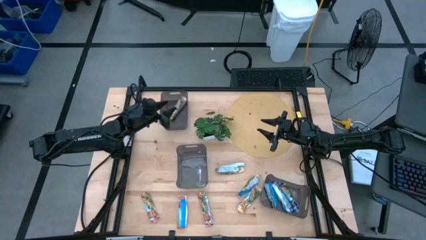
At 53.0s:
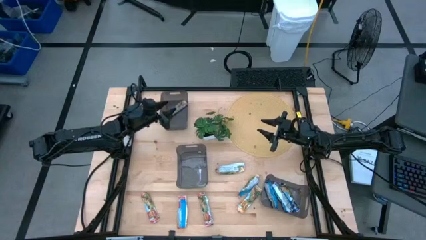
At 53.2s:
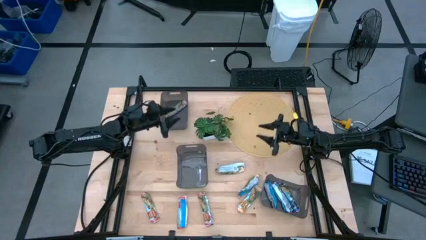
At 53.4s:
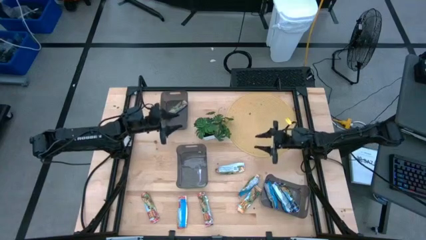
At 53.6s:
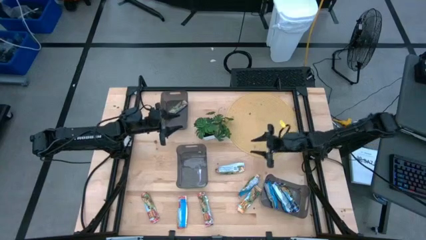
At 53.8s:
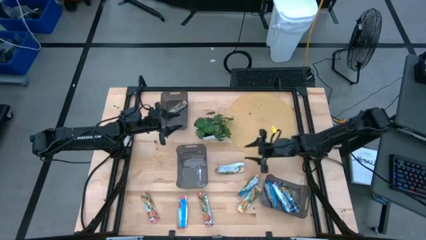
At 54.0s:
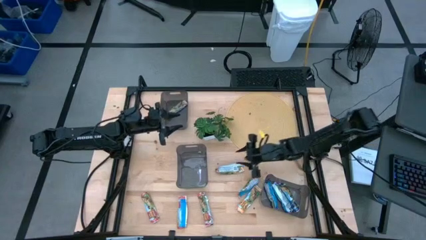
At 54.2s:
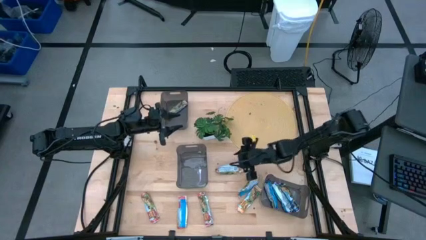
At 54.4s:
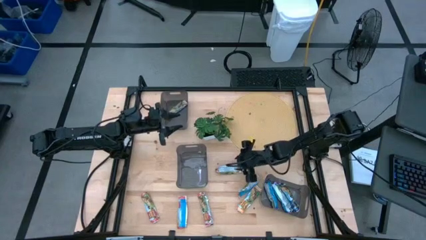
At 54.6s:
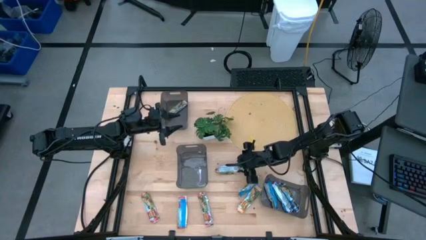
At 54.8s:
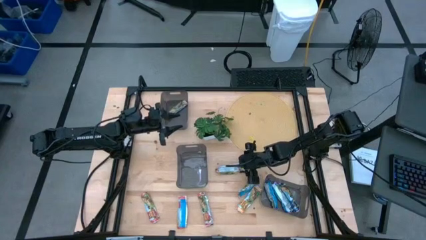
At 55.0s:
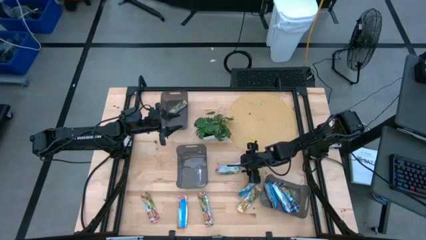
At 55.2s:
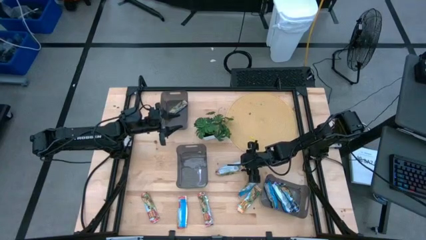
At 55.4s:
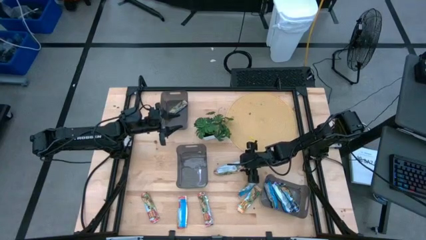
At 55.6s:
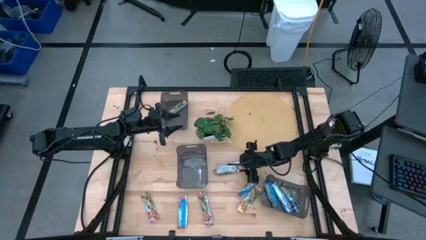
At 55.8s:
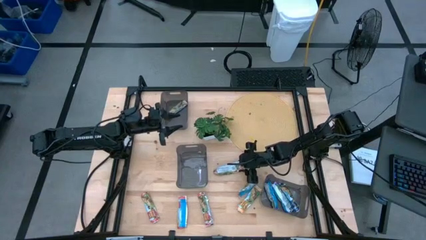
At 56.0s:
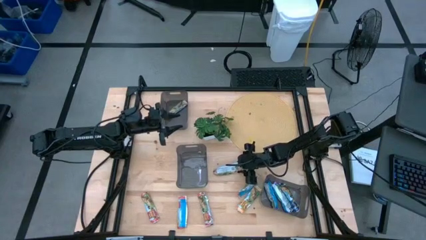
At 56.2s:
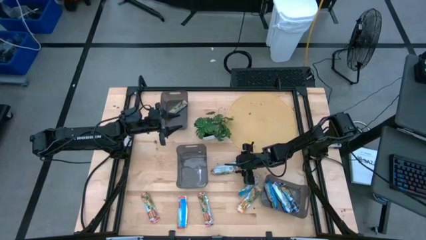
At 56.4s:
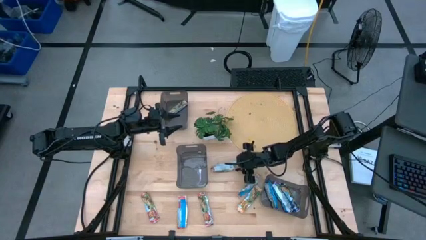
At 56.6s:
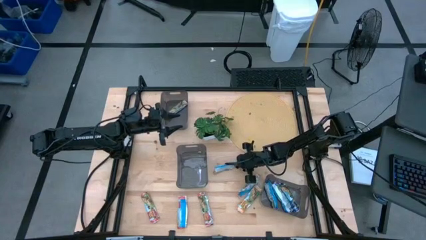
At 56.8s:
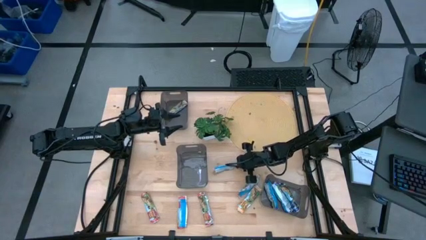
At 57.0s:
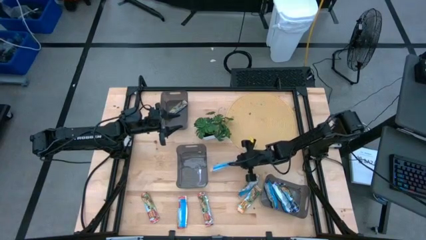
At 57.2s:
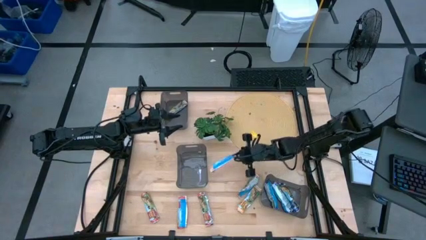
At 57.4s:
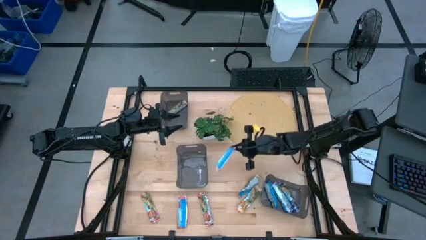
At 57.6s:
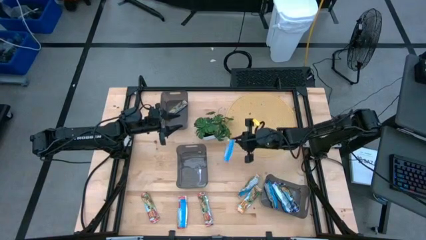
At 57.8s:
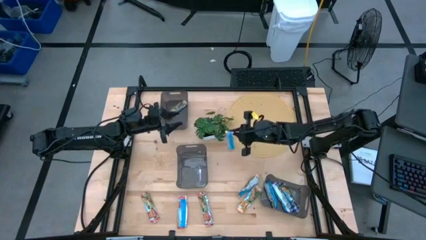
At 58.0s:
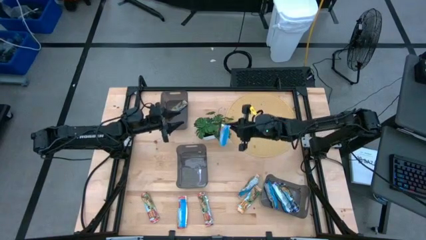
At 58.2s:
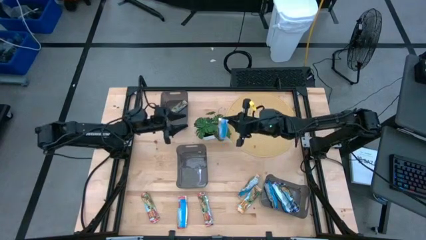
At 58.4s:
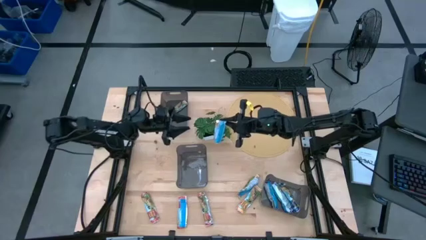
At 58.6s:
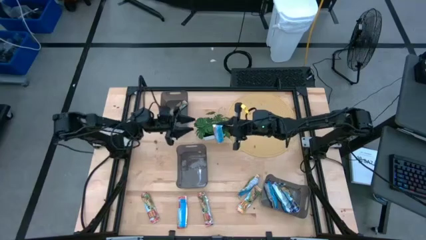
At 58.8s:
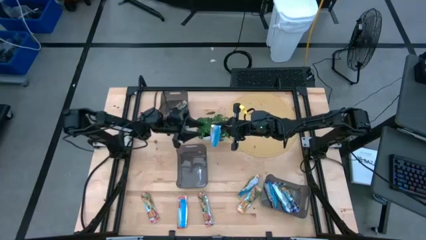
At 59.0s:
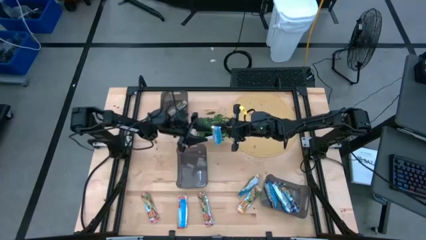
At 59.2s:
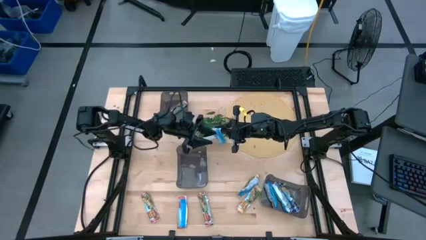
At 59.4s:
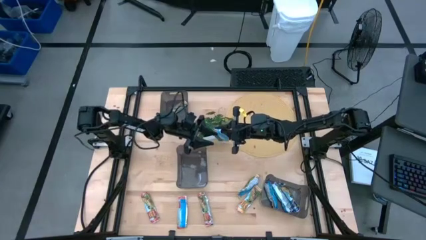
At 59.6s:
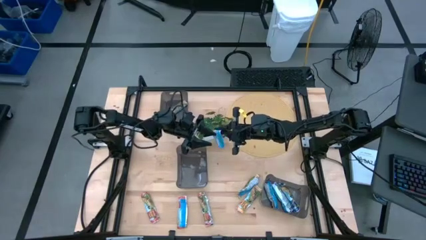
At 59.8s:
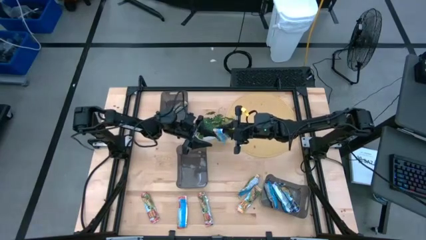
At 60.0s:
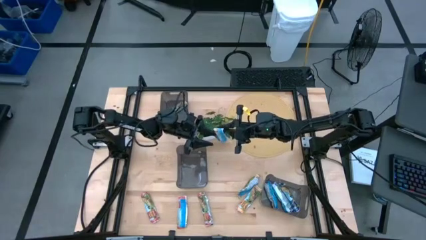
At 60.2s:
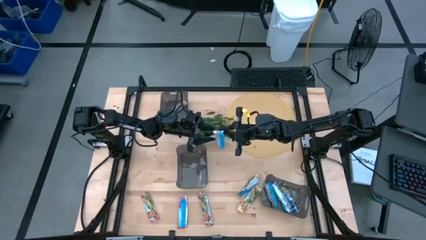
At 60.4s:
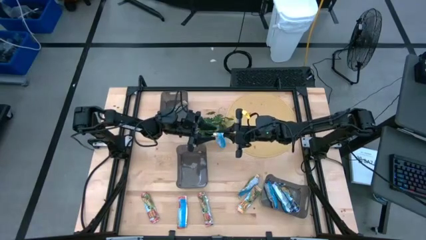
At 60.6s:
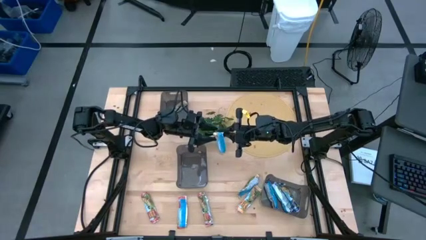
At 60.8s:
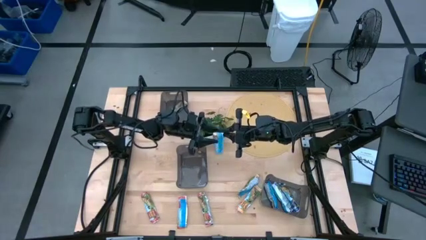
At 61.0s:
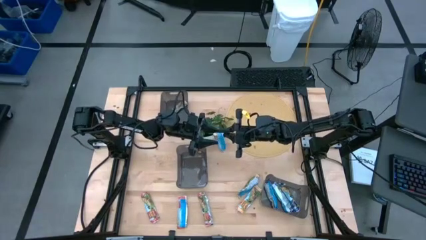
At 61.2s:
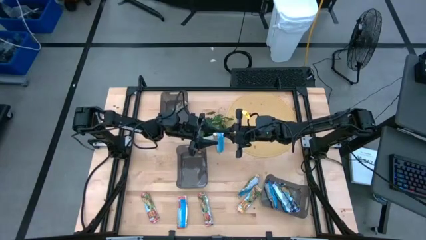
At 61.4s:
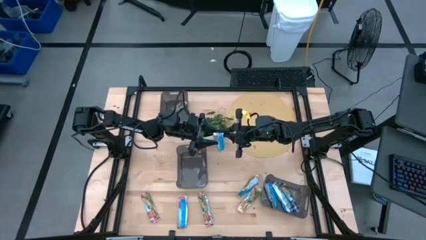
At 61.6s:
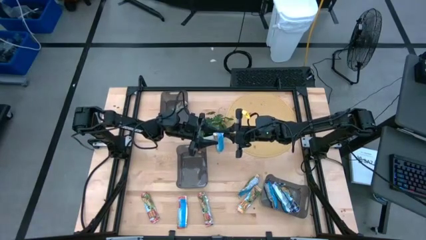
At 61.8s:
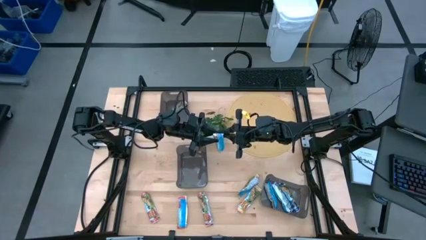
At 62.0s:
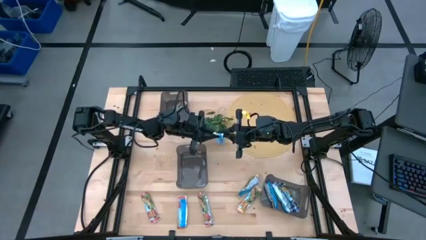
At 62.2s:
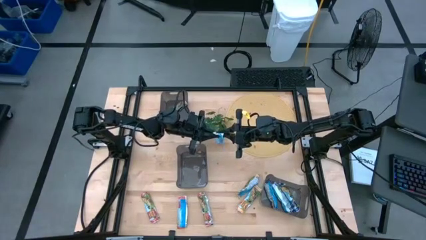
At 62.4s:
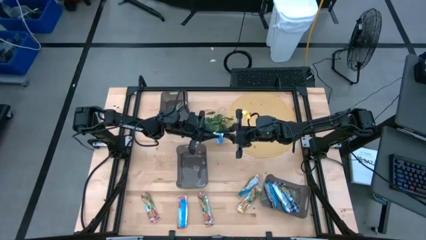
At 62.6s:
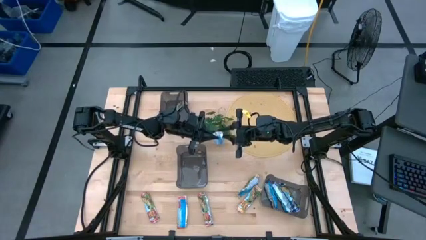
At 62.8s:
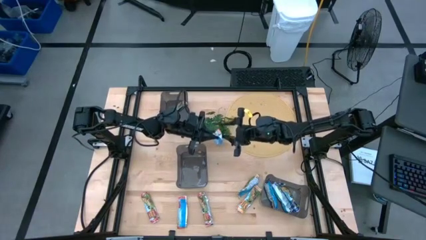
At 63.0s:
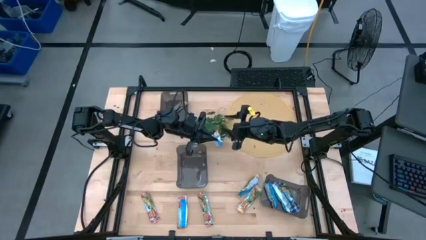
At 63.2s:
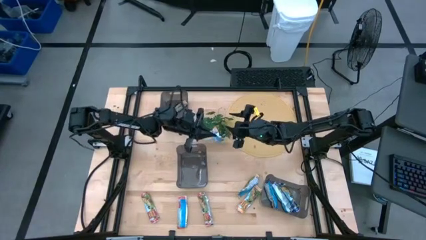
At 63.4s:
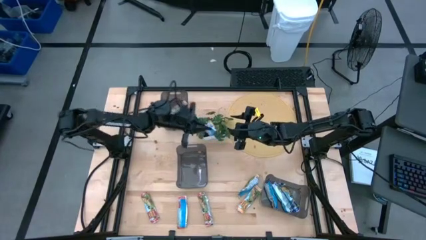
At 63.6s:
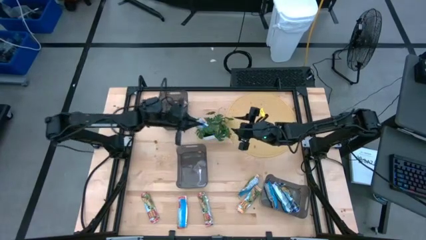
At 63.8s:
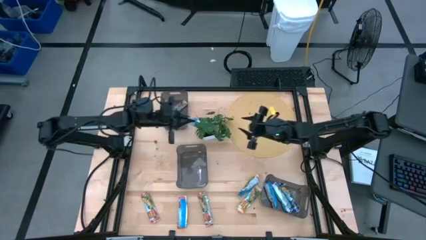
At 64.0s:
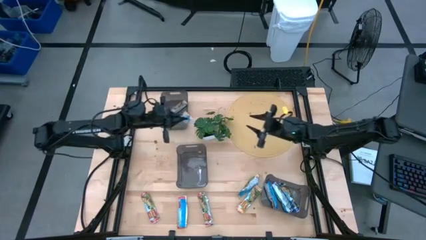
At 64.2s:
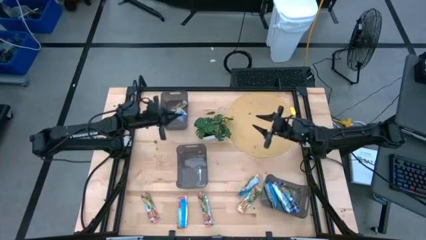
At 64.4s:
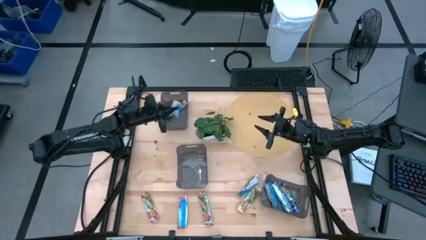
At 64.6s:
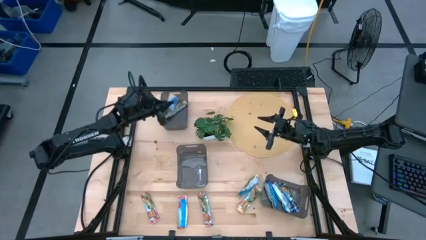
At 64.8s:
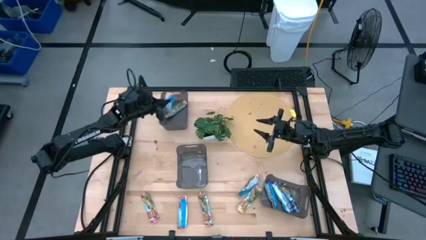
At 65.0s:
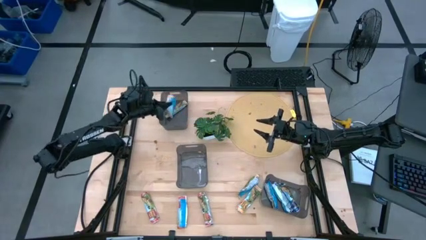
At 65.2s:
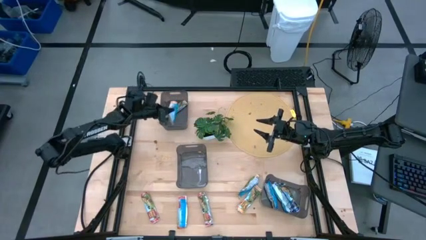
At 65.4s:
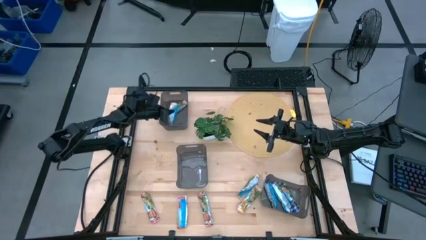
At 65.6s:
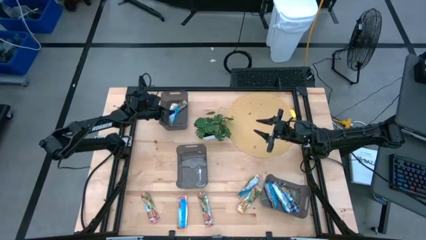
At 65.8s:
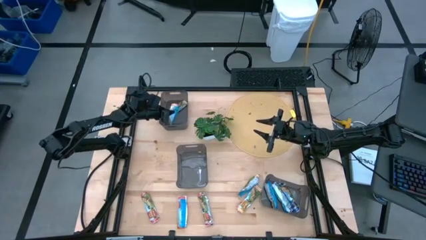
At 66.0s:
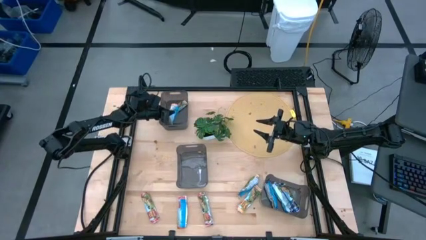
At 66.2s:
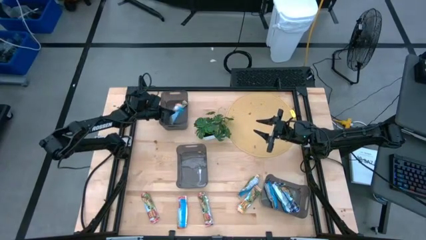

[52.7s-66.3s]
Task: Pick and place Granola Bars by type
Put the top orange granola bar into the top black bin
